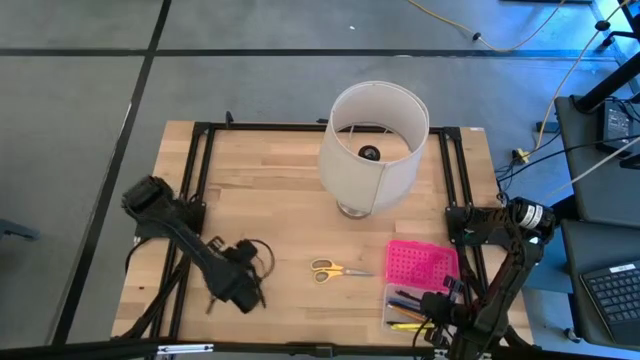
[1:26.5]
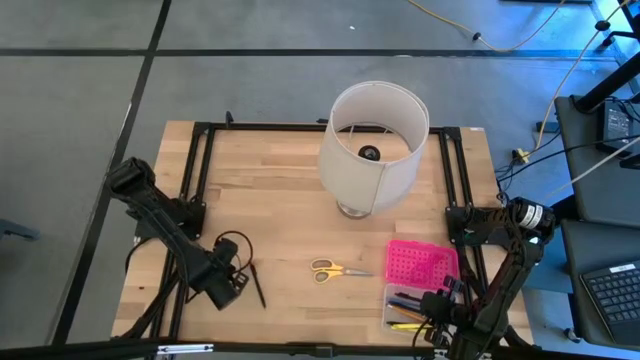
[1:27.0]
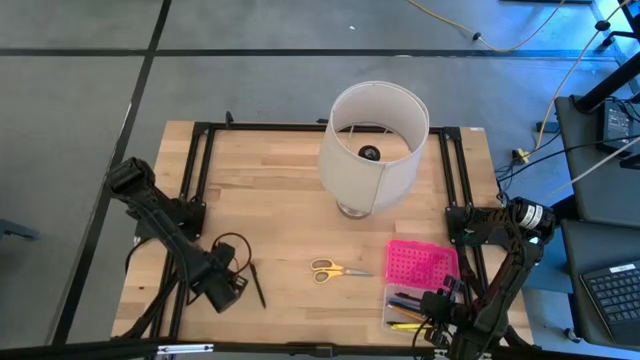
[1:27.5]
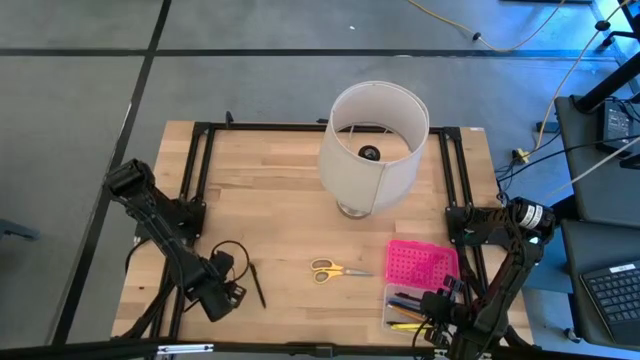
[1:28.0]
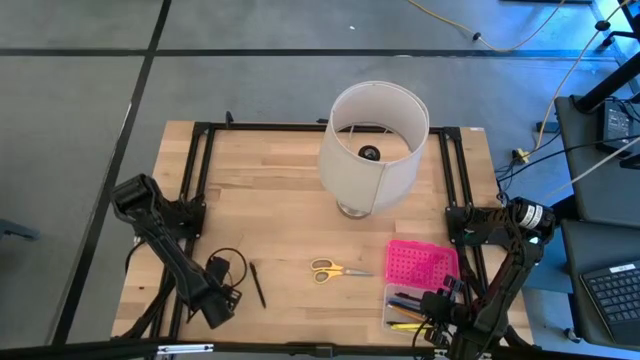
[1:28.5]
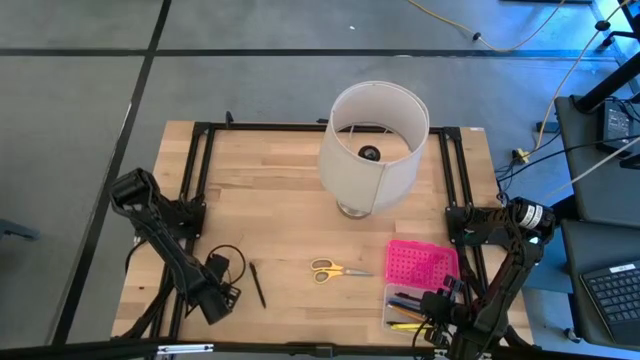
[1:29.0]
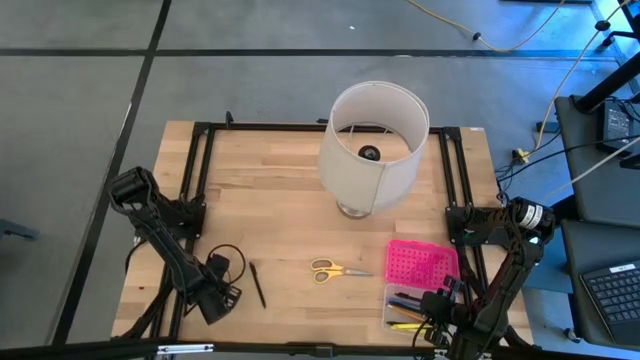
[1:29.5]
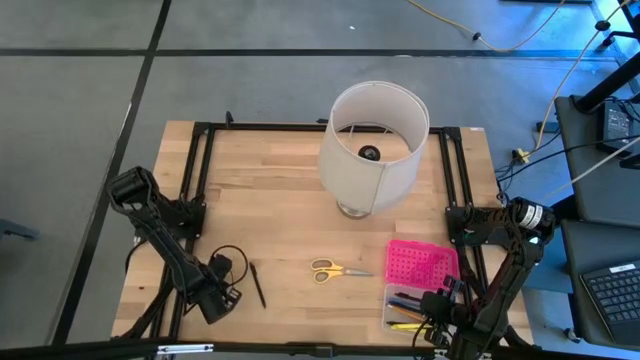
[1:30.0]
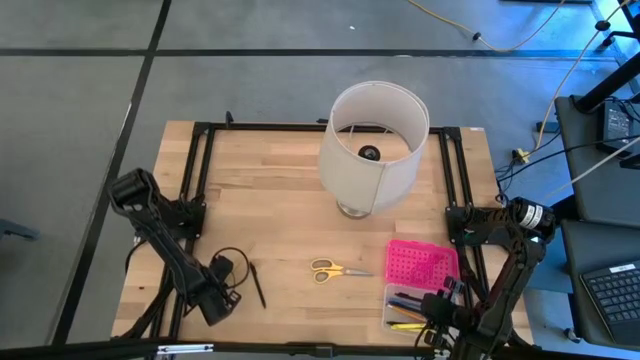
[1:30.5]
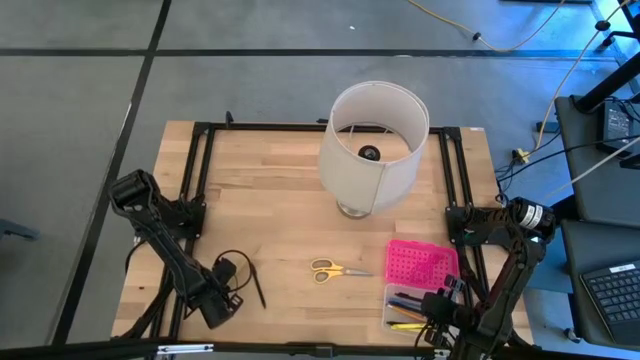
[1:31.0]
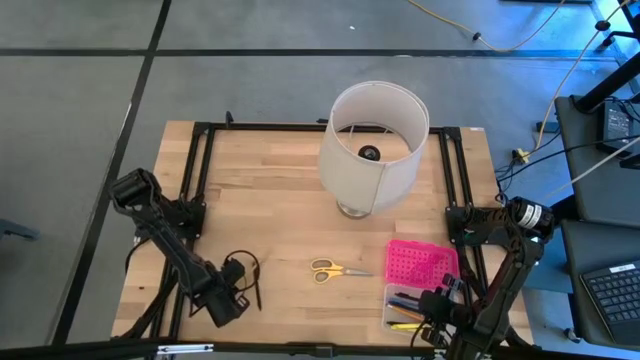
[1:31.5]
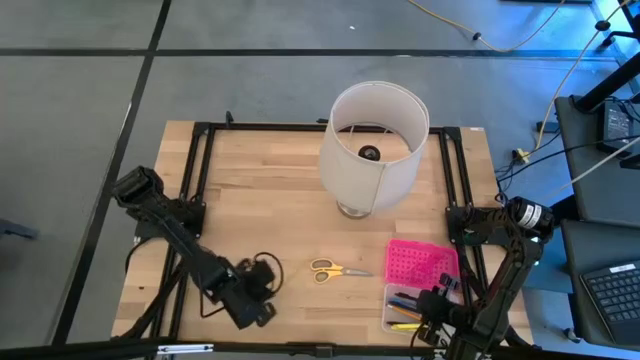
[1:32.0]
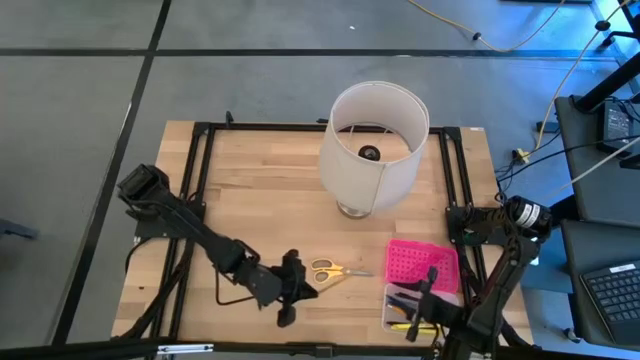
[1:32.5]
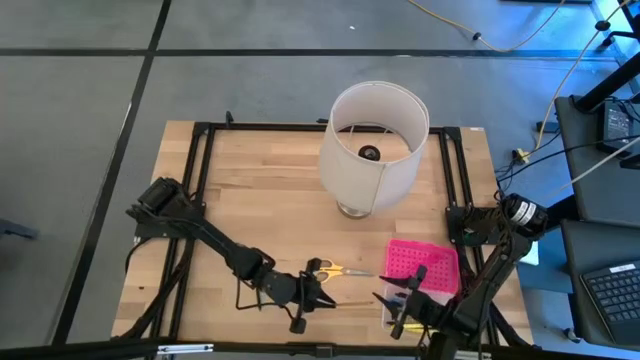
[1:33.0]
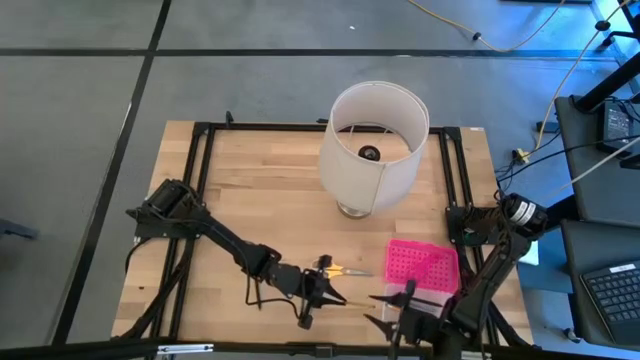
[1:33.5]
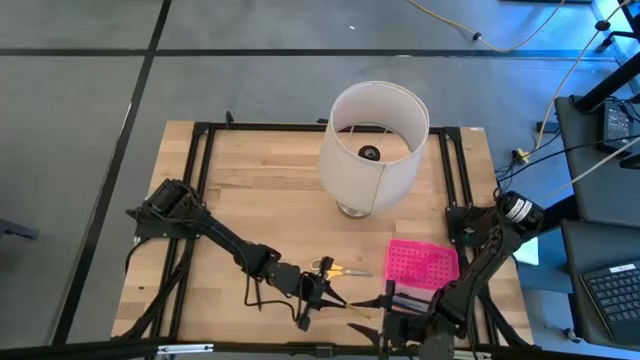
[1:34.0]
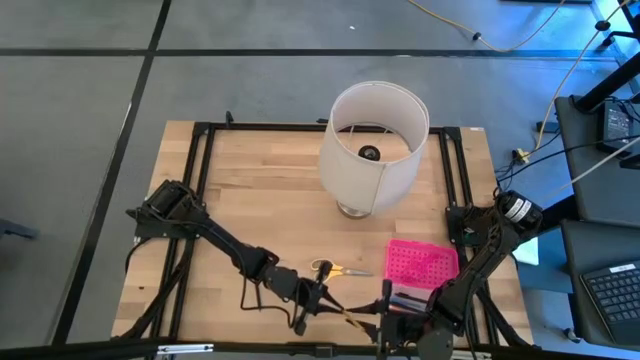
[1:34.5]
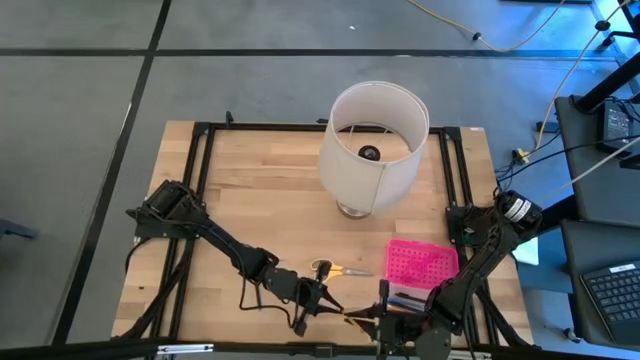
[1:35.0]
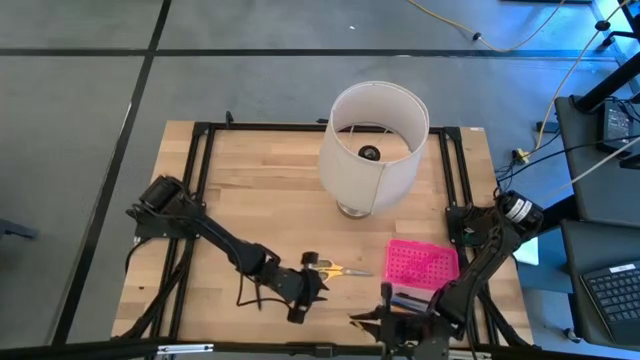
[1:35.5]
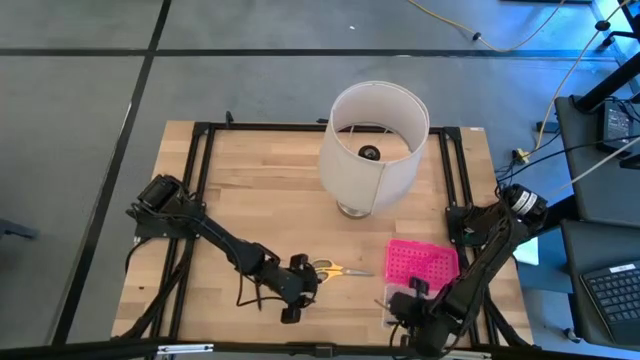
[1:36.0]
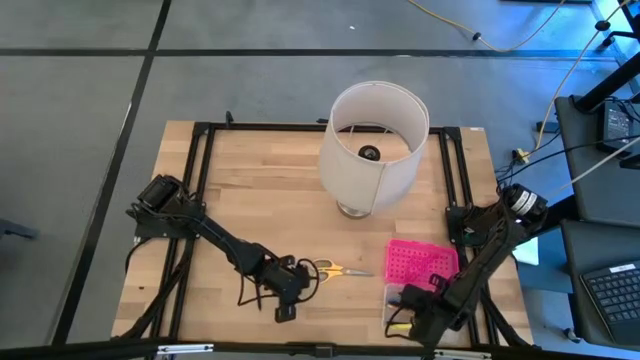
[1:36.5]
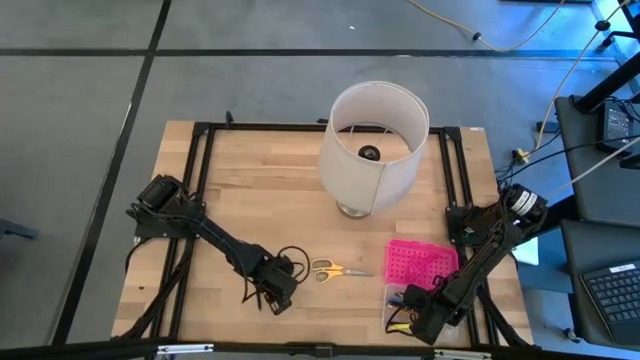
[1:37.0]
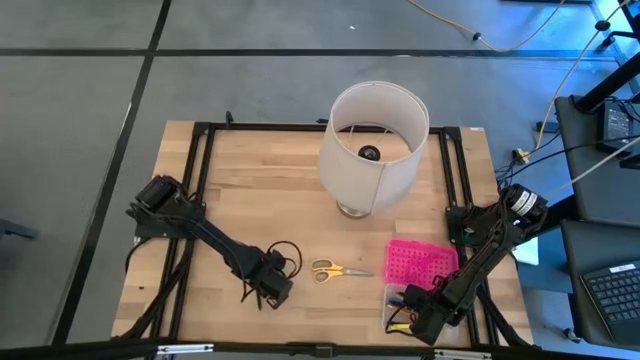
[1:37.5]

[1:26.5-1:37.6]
Task: Pick & place school supplies into a supply box
Put the yellow pencil into the supply box

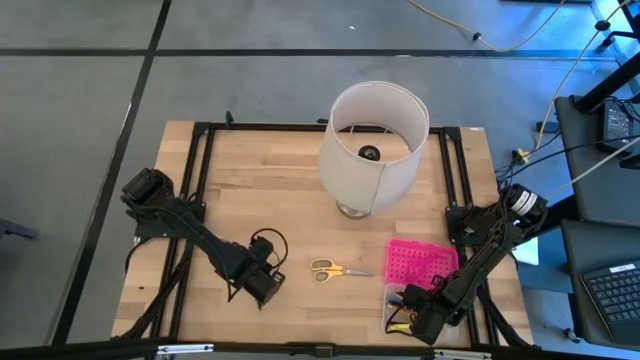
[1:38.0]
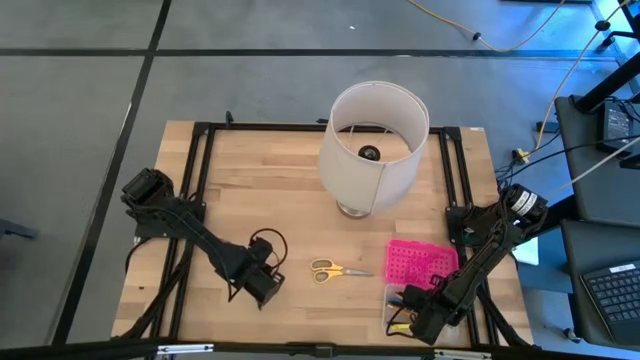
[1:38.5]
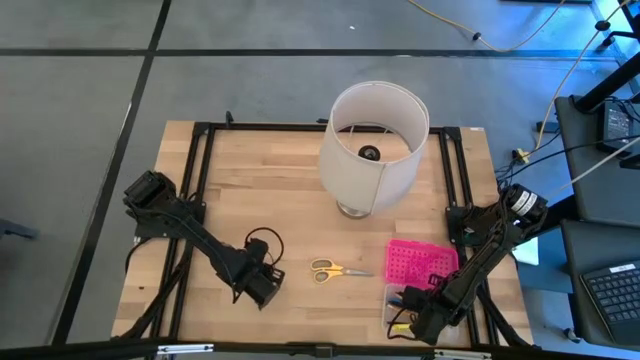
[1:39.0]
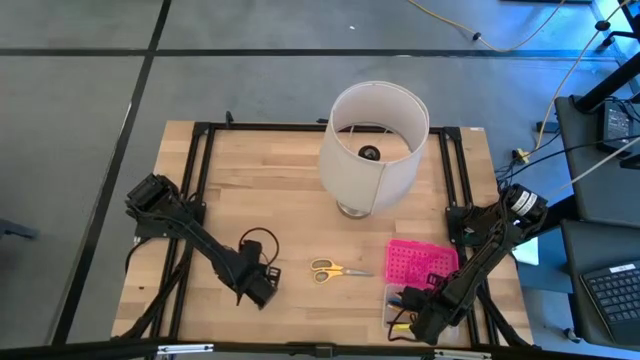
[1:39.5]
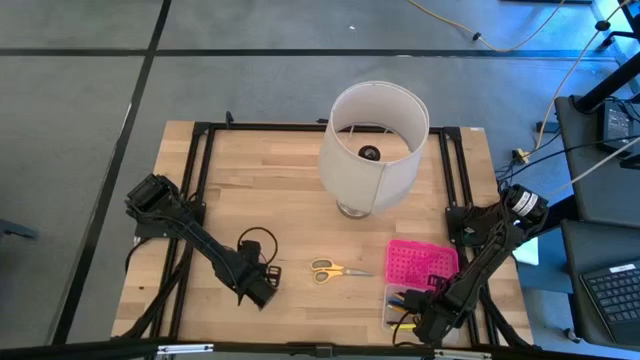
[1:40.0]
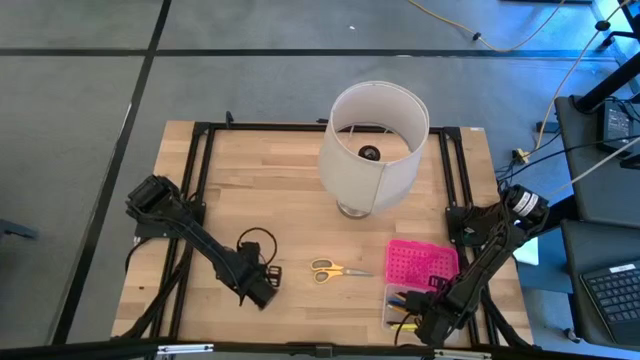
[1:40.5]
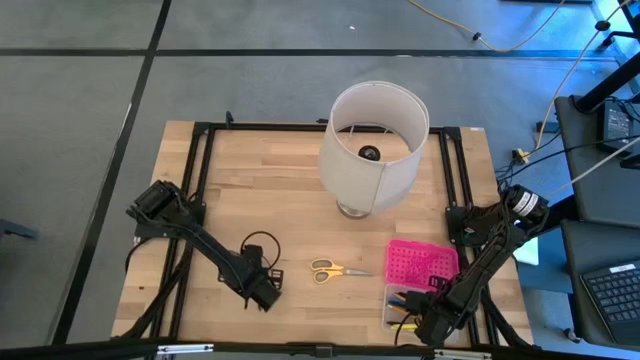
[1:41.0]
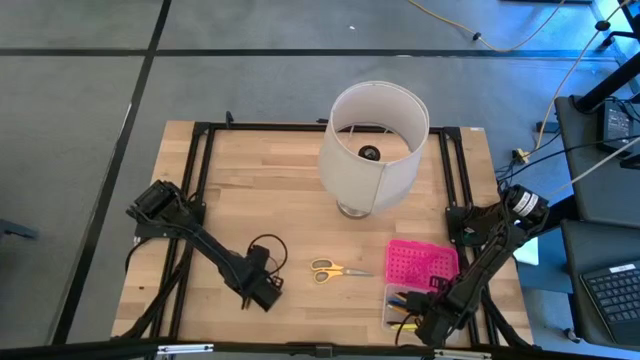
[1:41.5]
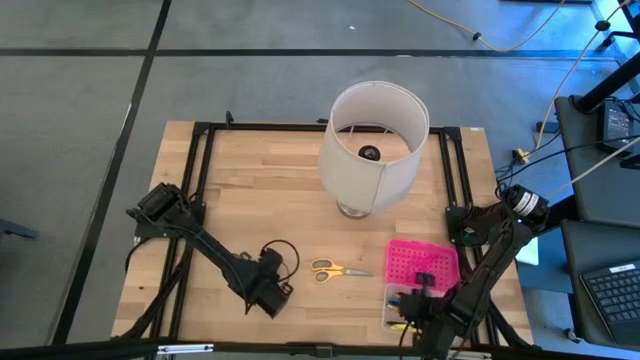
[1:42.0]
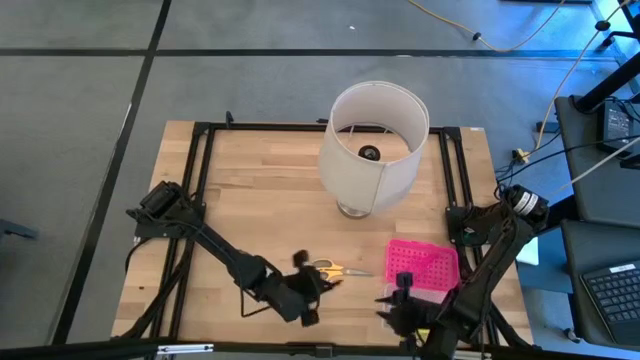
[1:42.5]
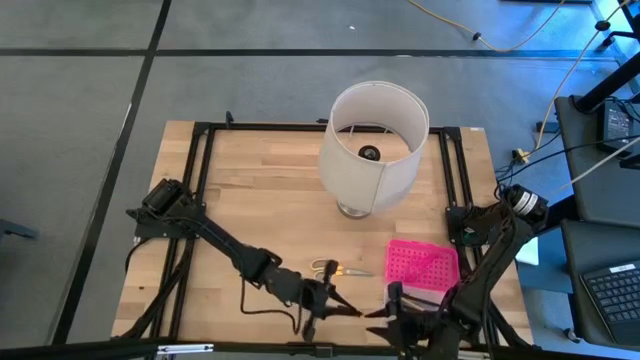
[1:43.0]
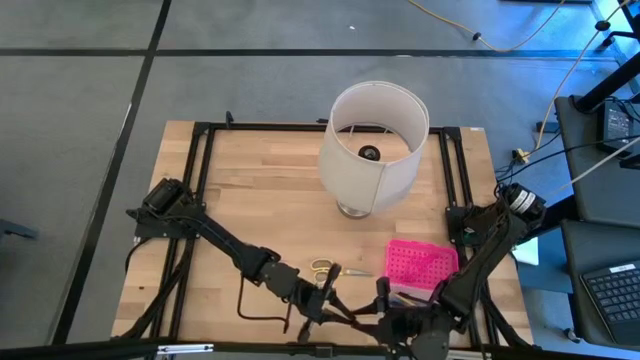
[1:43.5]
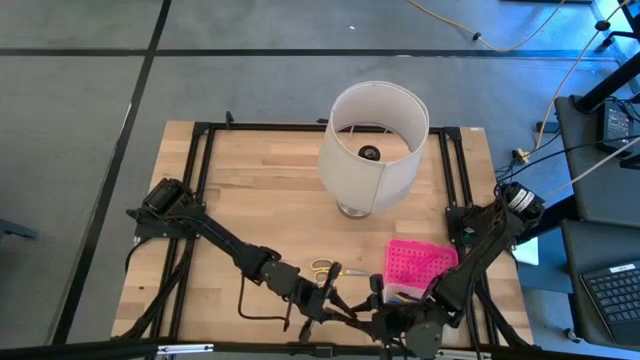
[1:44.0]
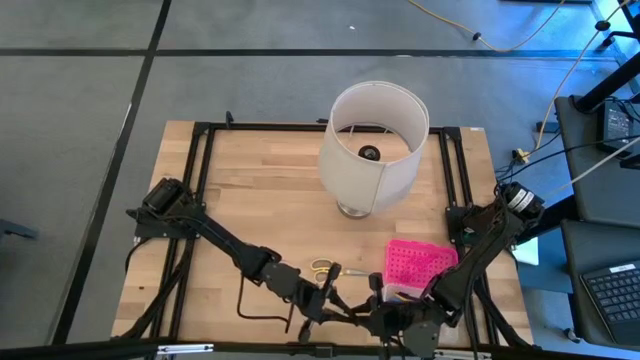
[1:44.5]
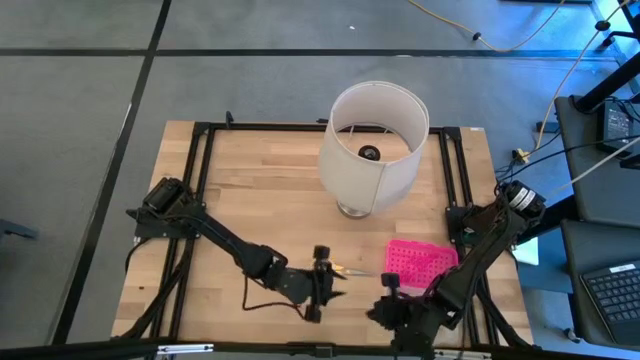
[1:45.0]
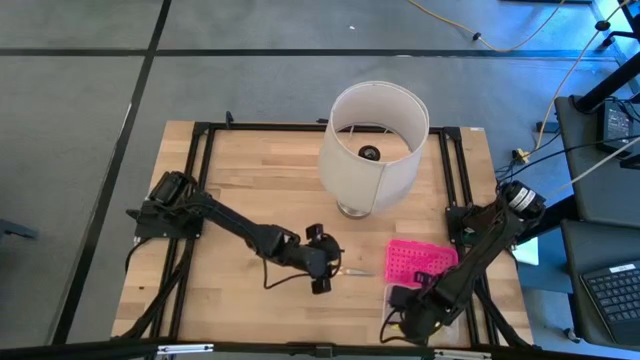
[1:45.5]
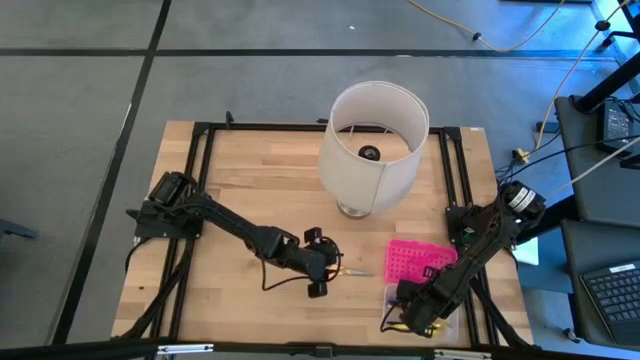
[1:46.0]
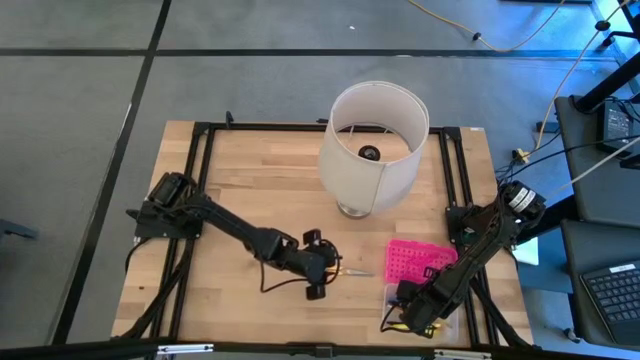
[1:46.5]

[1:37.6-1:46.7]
Put the black pen into the supply box
